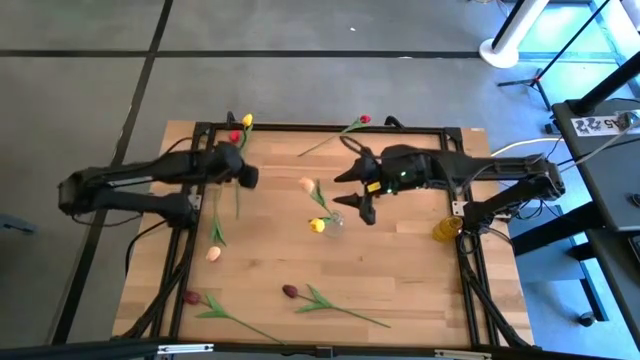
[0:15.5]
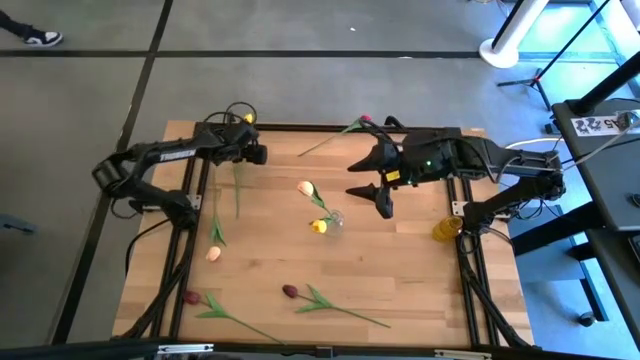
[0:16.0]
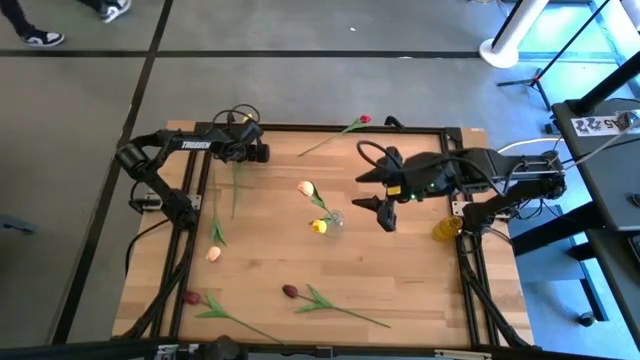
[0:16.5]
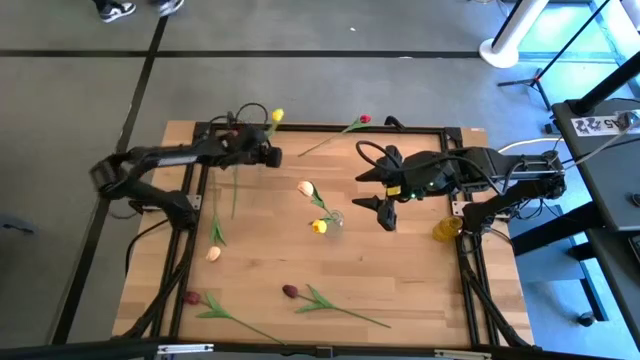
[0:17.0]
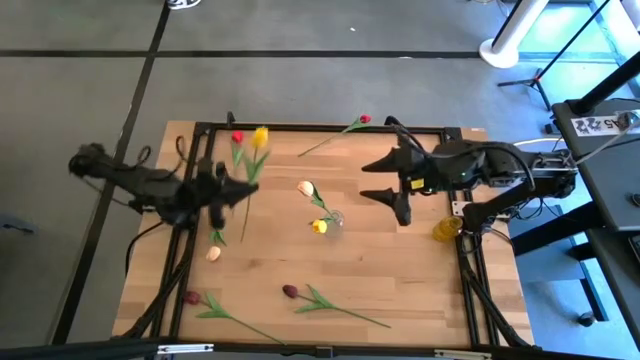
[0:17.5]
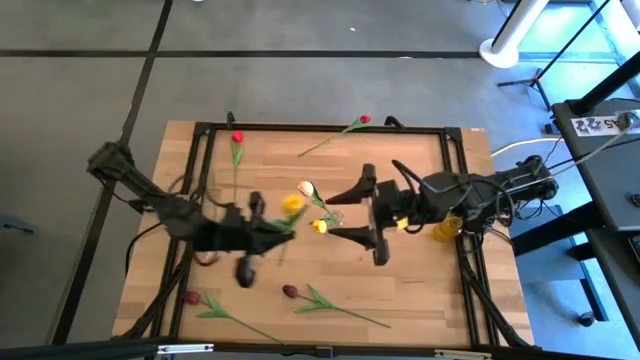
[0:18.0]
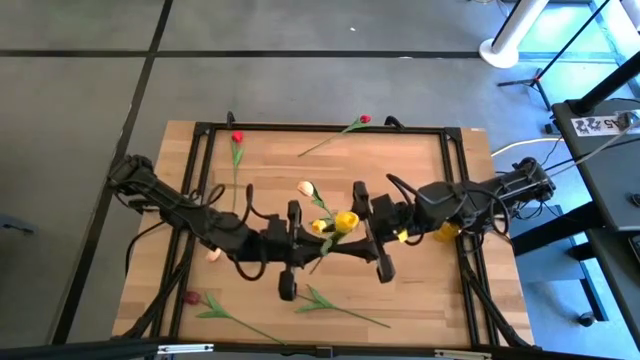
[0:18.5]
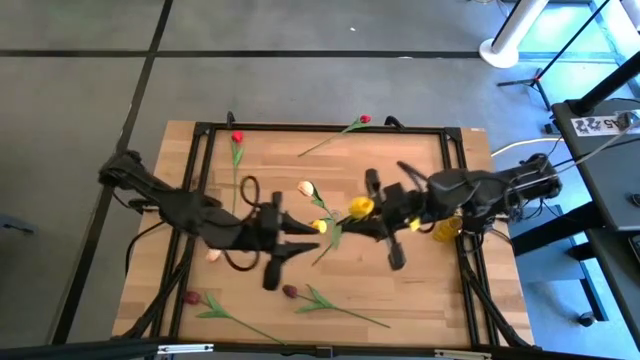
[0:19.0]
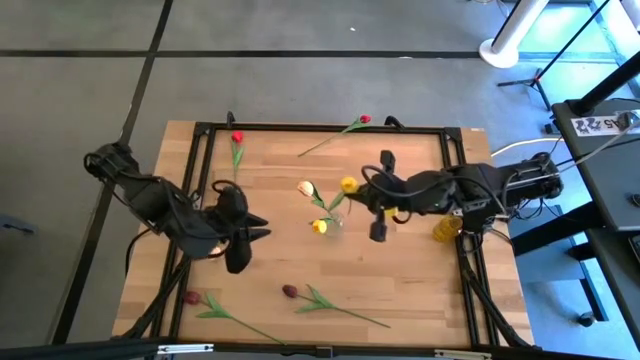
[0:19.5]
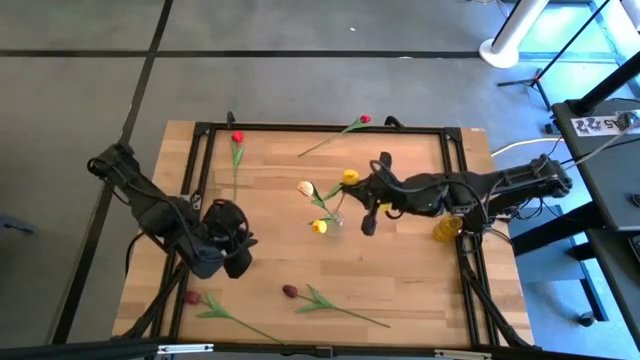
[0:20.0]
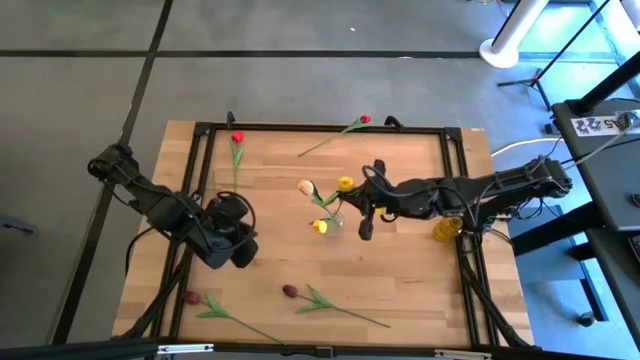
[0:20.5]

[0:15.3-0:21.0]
Task: Sort flowers into vase by color
Put the yellow tulip into the transparent vase

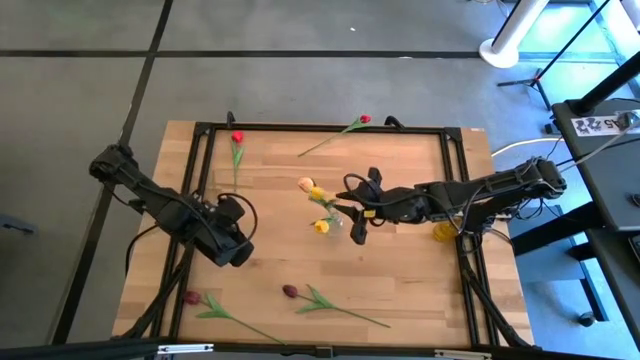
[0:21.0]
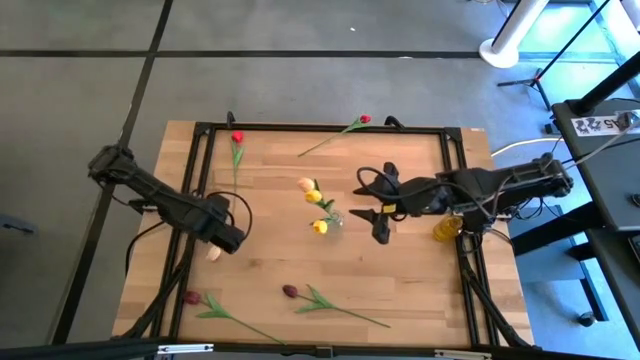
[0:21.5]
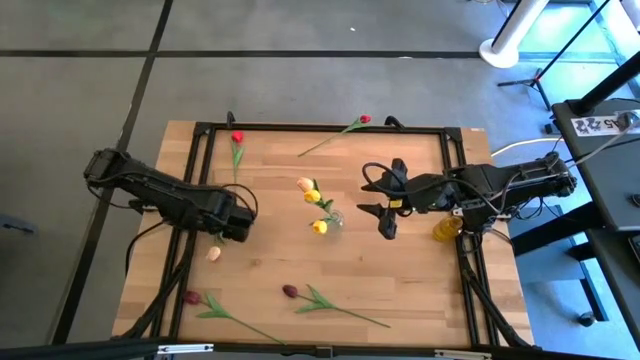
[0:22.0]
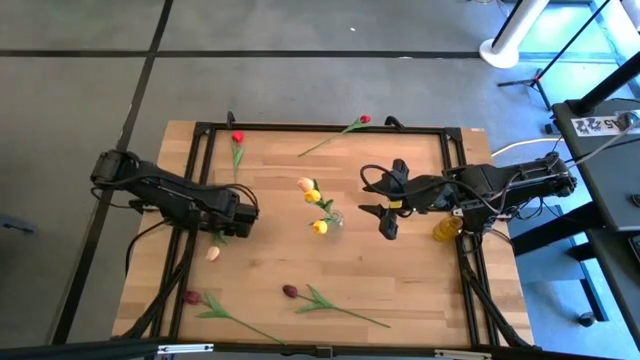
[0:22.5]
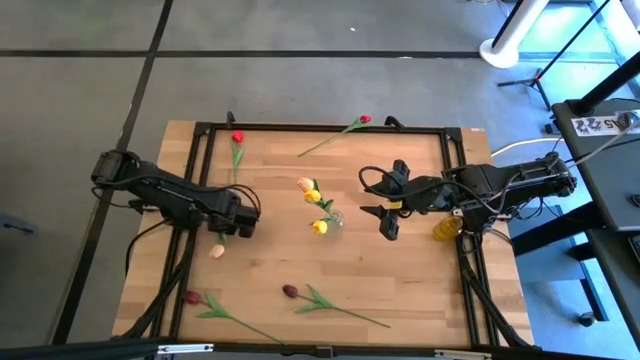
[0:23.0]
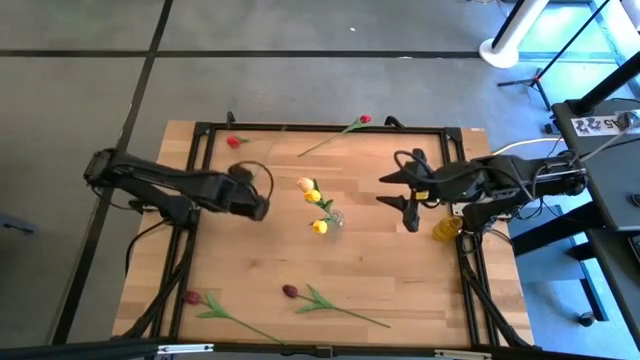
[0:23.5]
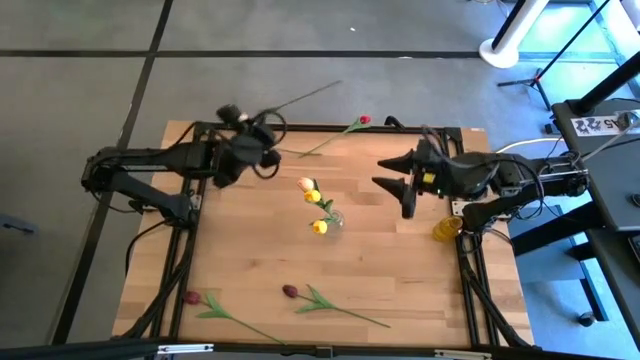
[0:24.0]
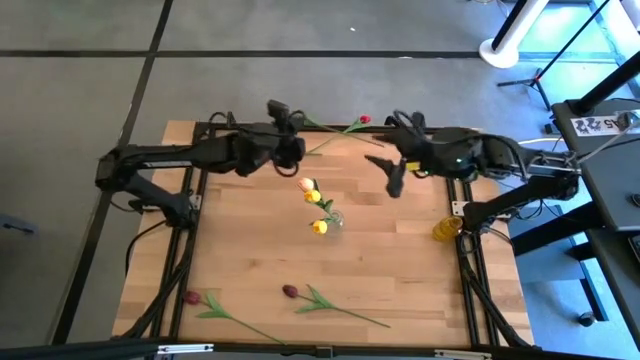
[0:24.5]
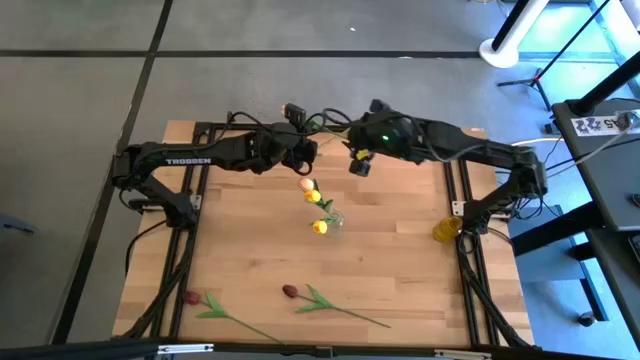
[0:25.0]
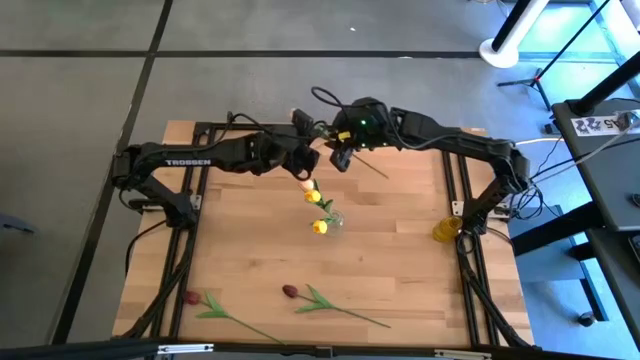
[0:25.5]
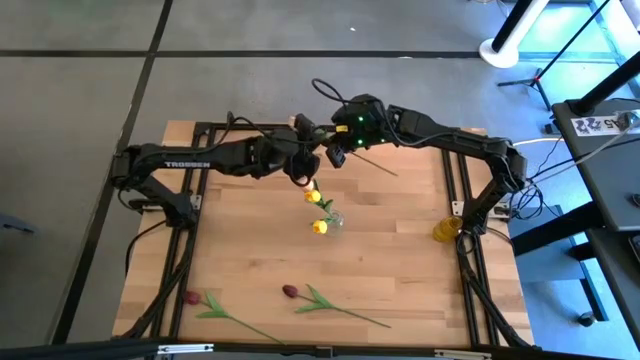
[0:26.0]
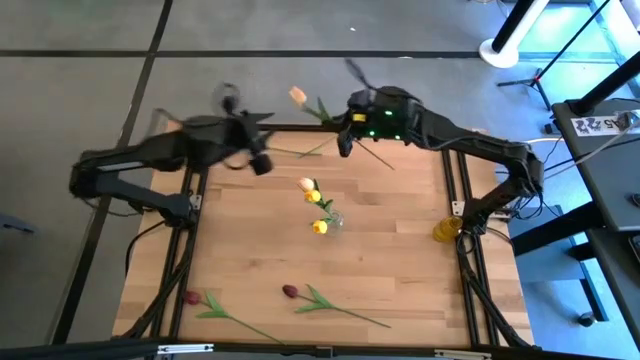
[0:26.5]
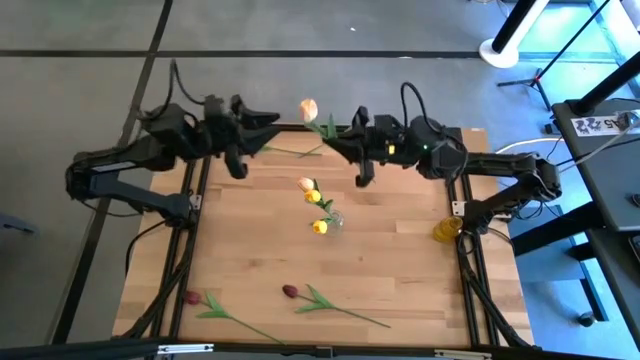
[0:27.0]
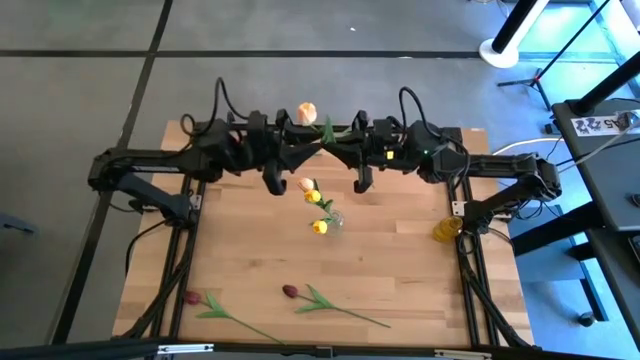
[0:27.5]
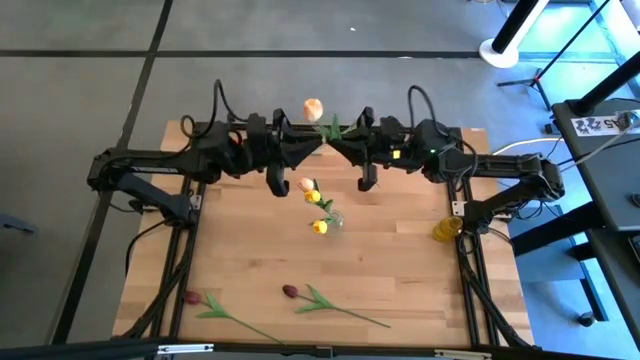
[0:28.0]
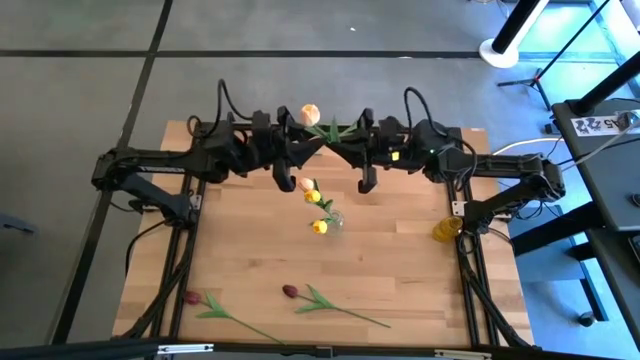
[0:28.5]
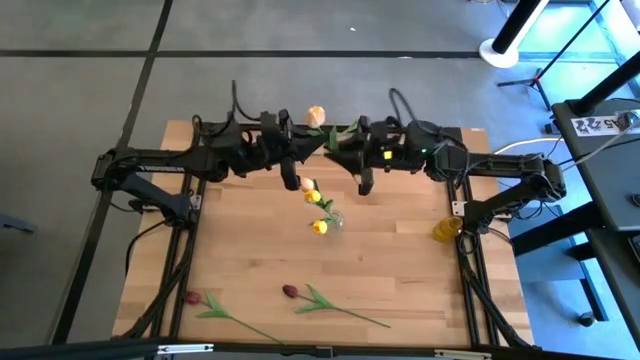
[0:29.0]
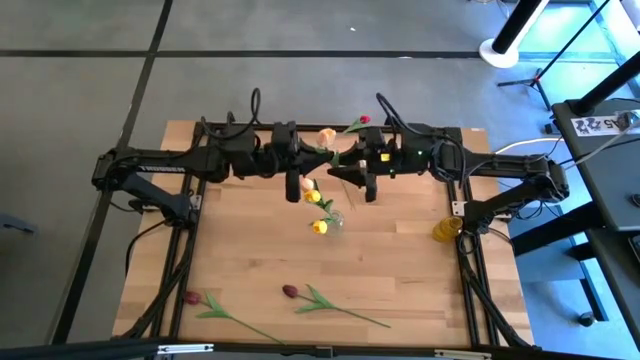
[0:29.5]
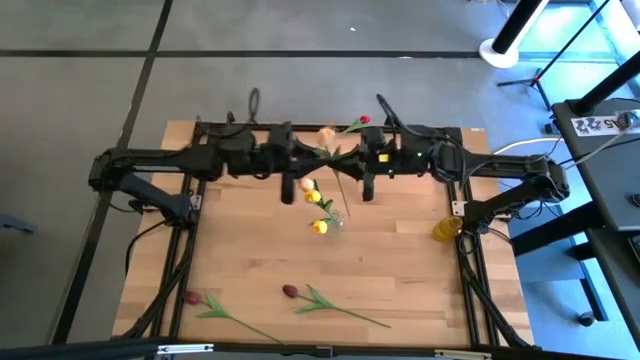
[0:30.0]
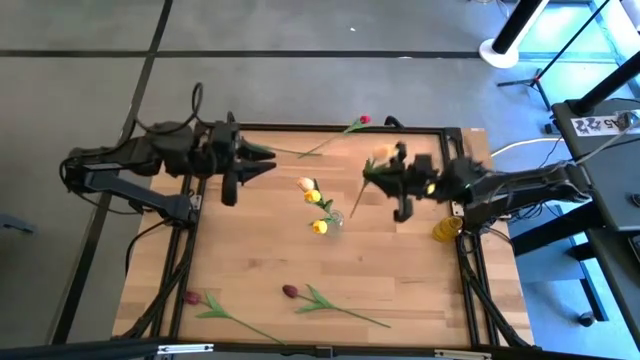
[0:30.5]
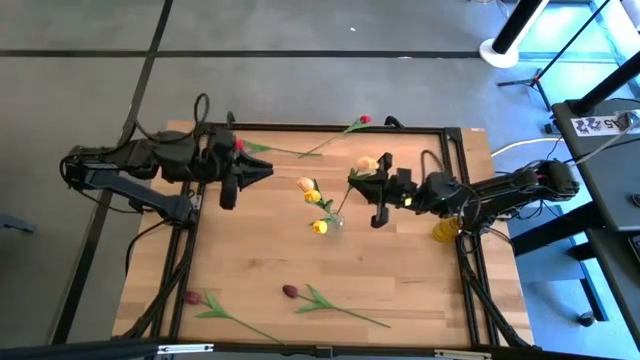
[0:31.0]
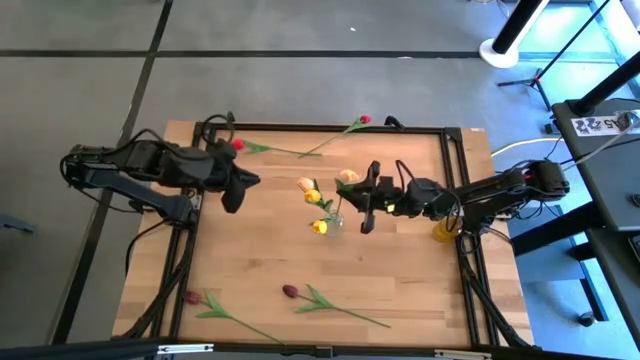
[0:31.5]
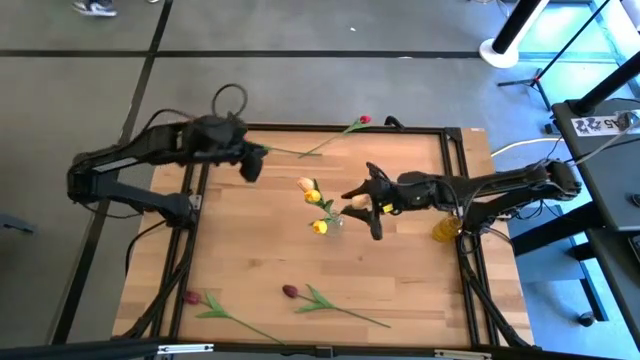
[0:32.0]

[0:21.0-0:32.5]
Put the pink tulip into the transparent vase

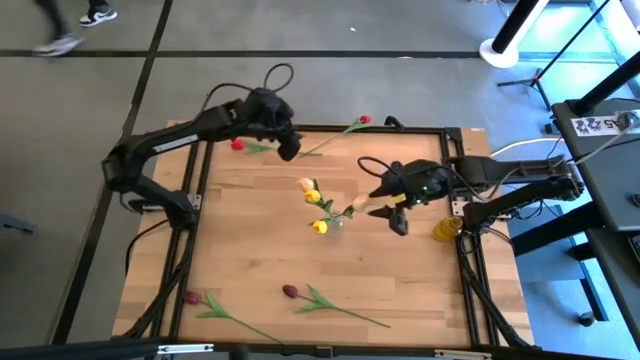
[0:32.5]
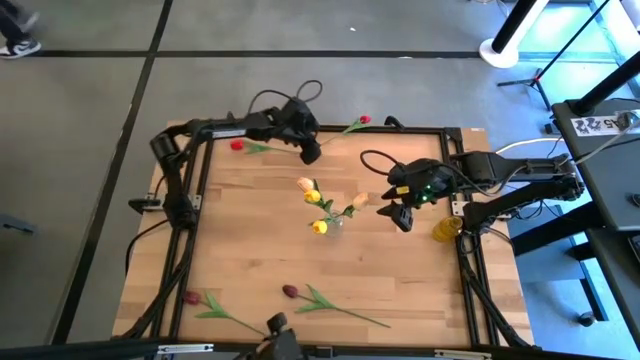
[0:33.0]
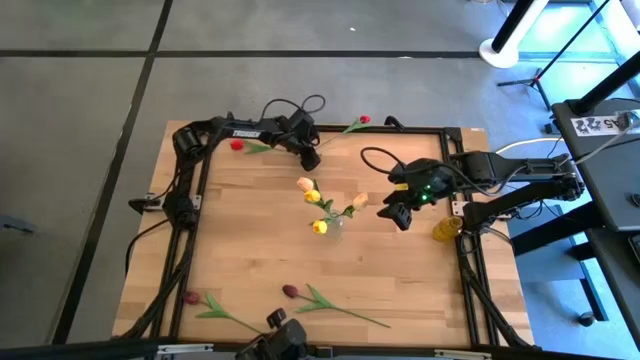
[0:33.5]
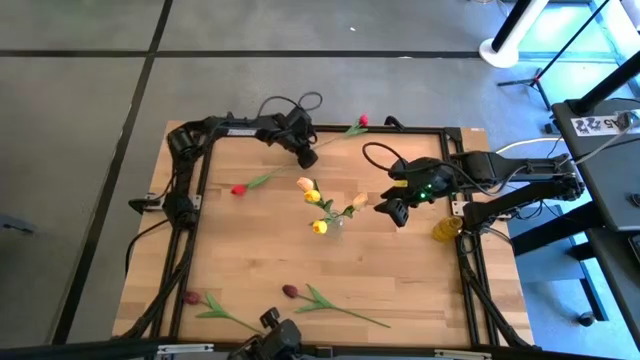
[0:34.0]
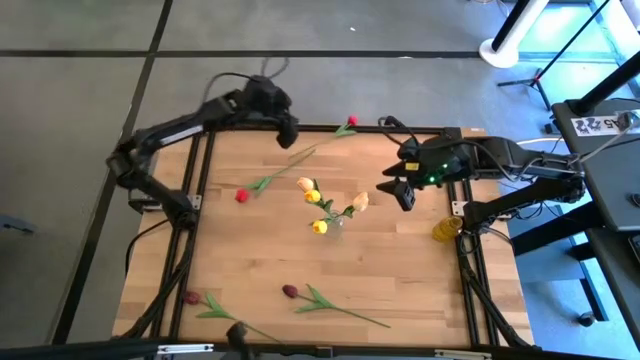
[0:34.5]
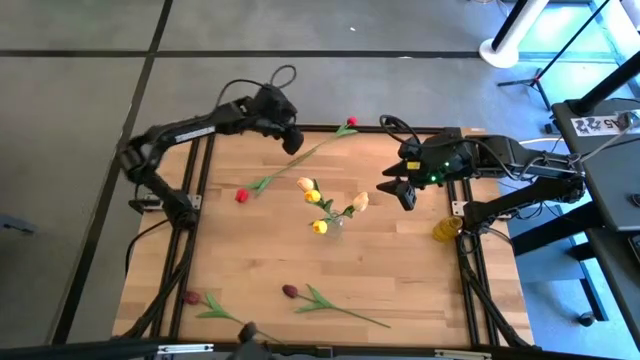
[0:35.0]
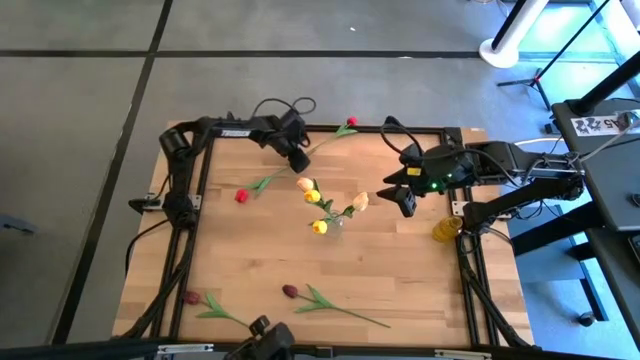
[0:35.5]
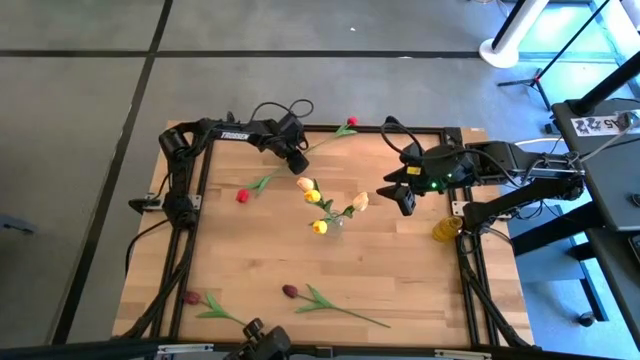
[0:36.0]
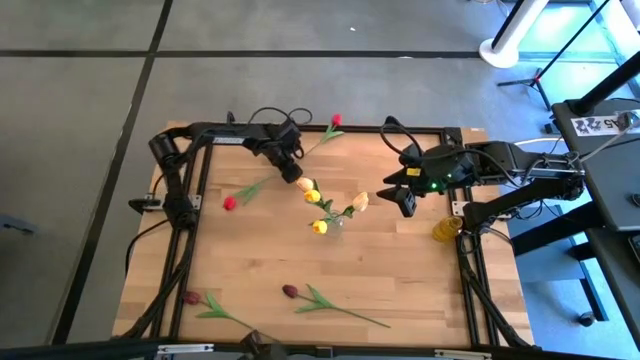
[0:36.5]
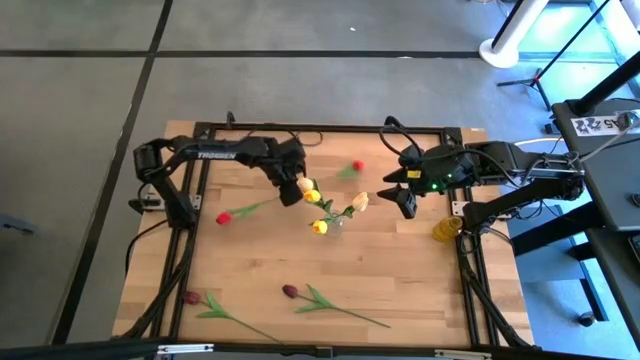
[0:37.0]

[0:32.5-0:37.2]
Put the right red tulip into the yellow vase
